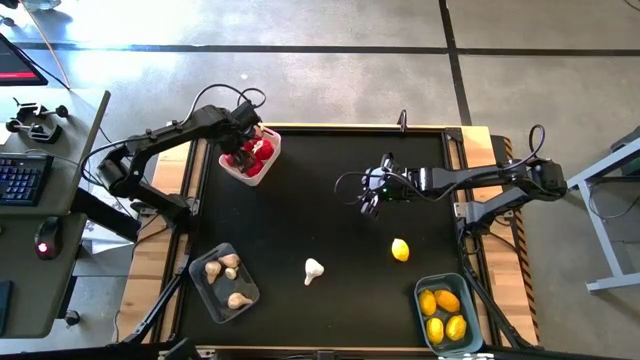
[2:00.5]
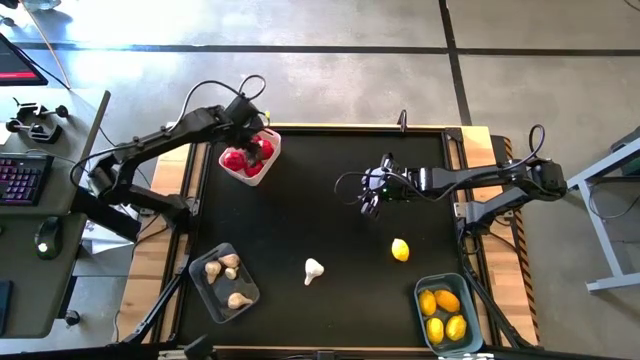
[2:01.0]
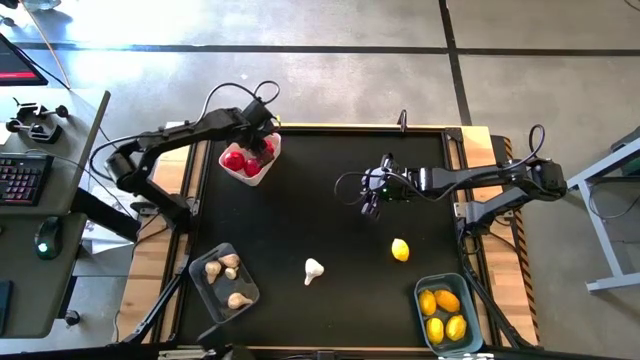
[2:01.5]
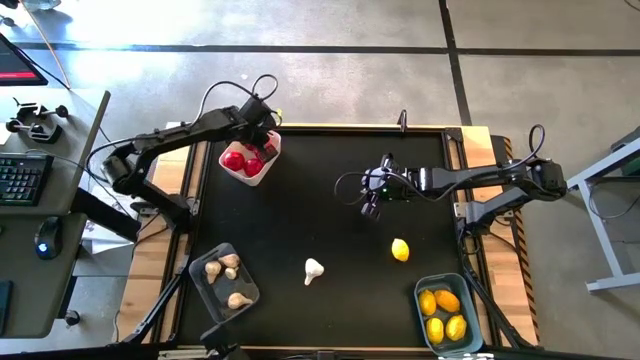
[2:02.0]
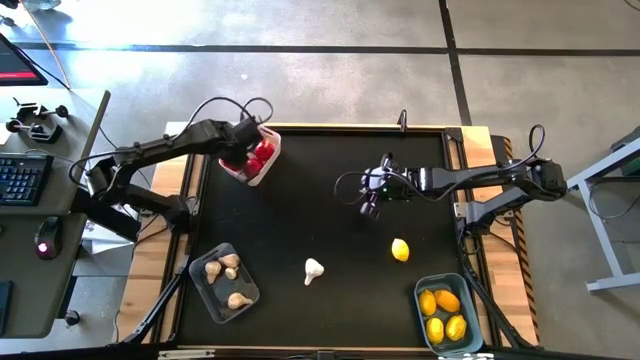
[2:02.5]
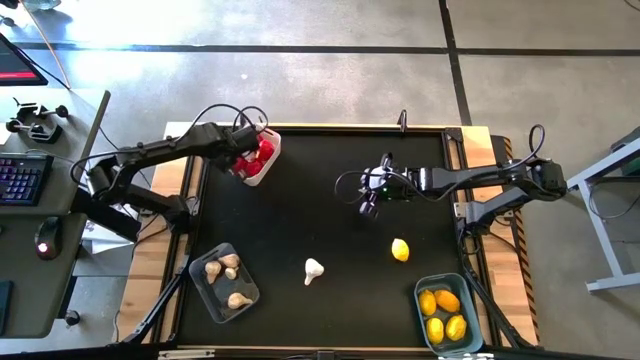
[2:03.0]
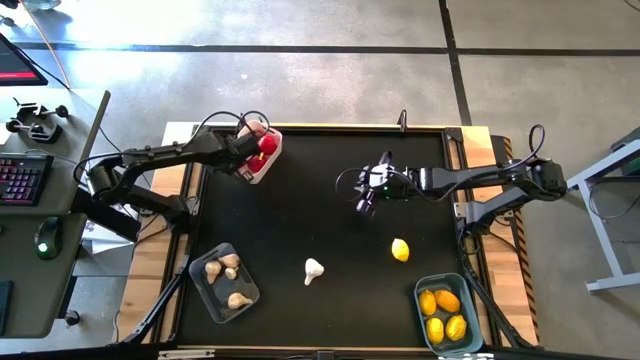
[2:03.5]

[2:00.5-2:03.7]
Task: Sort produce into baskets
Adjust the red tomatoes

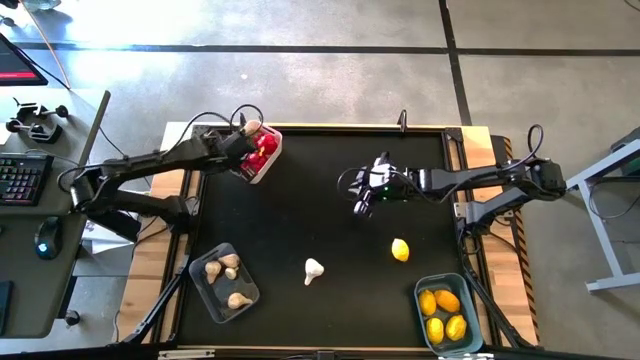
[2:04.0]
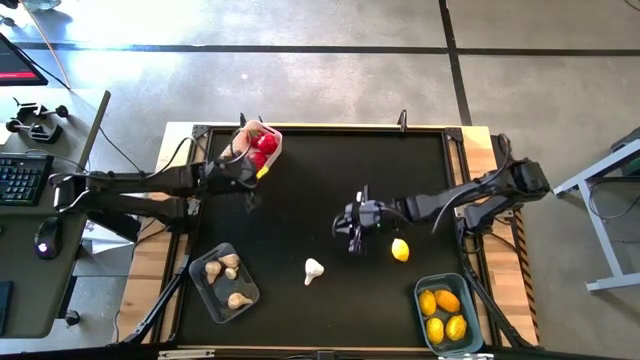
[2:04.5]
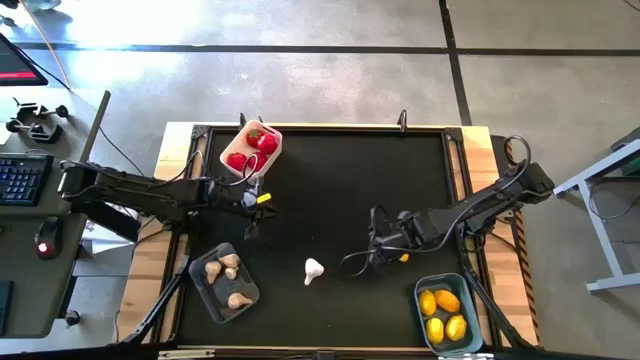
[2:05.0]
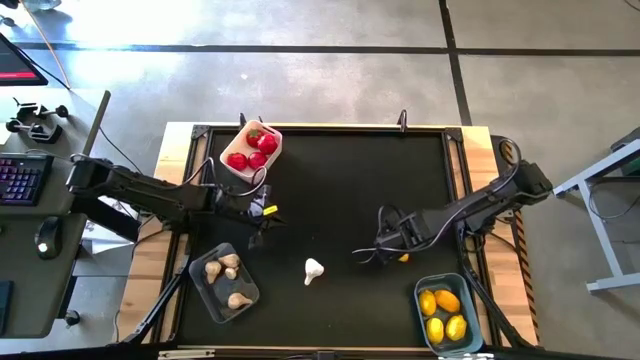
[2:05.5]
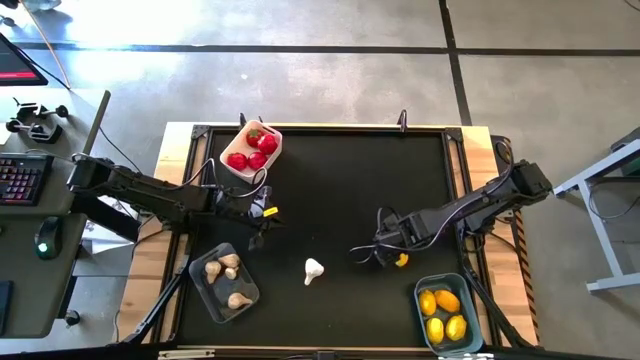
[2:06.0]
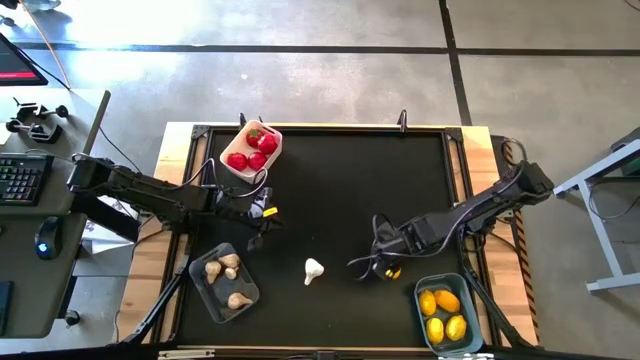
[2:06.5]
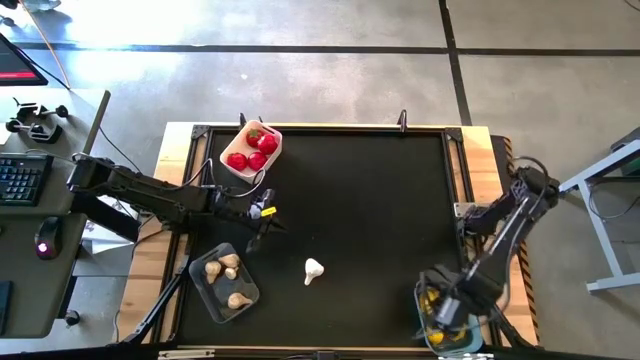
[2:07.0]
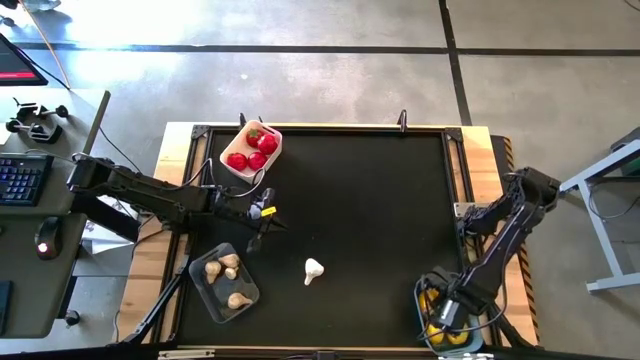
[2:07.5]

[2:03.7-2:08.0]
Put the yellow lemon into the blue bin

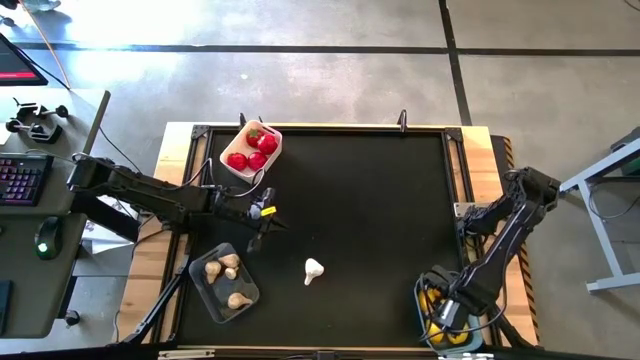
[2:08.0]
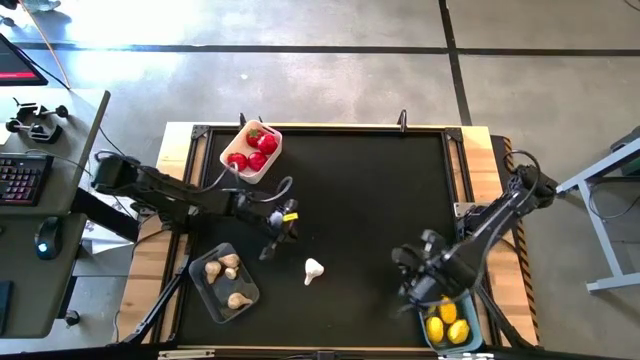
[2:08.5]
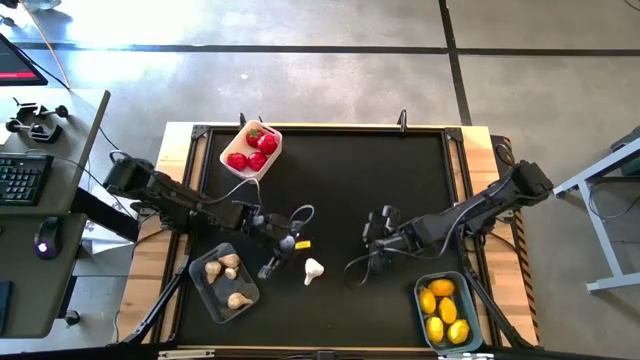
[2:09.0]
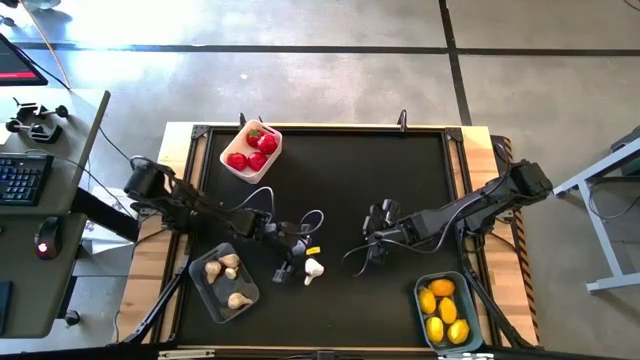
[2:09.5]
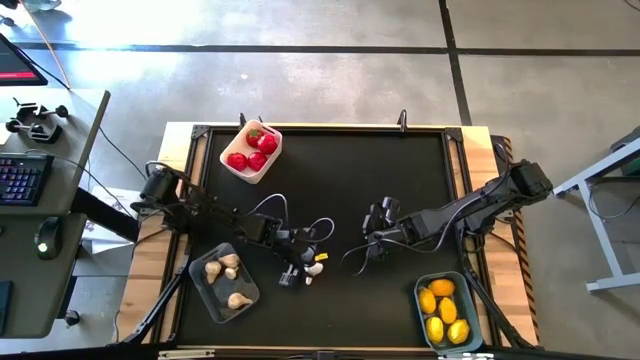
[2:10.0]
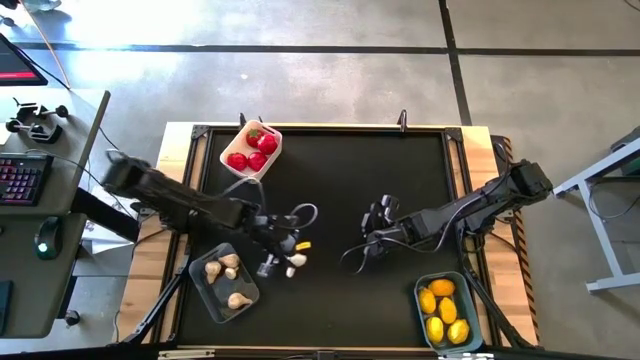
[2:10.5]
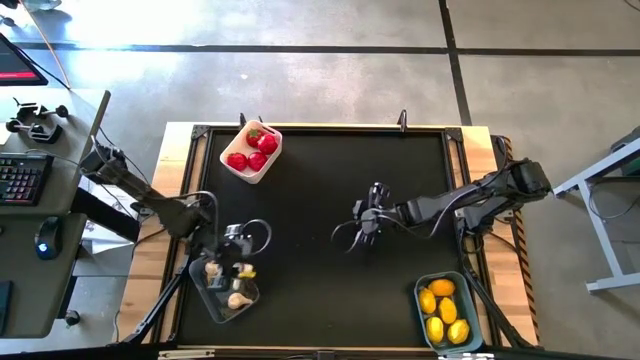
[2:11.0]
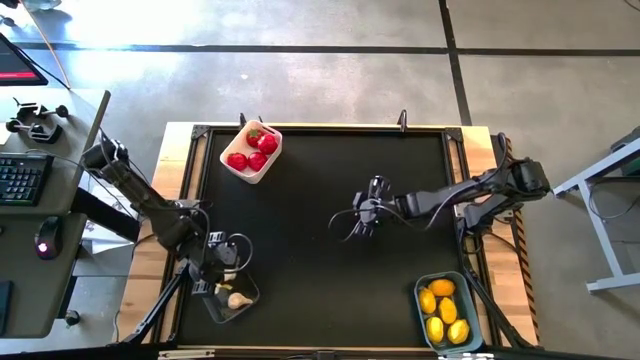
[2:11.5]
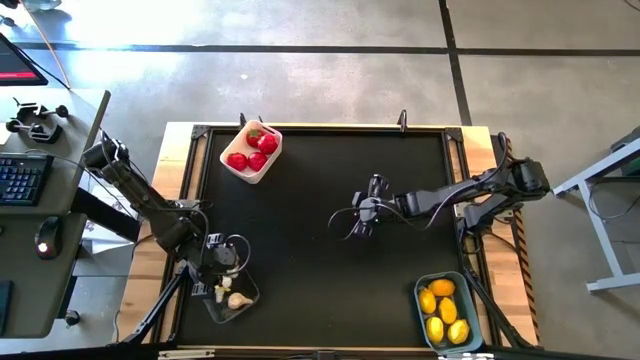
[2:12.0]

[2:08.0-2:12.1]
Put the white garlic into the transparent bin

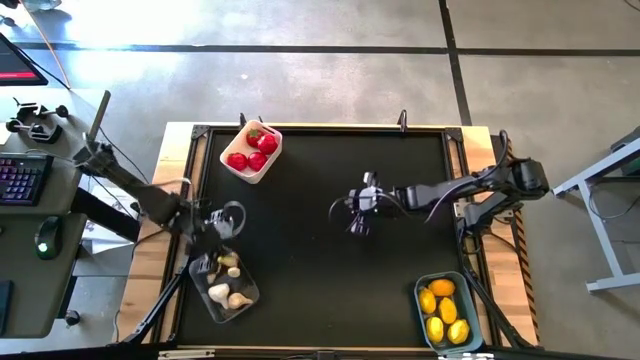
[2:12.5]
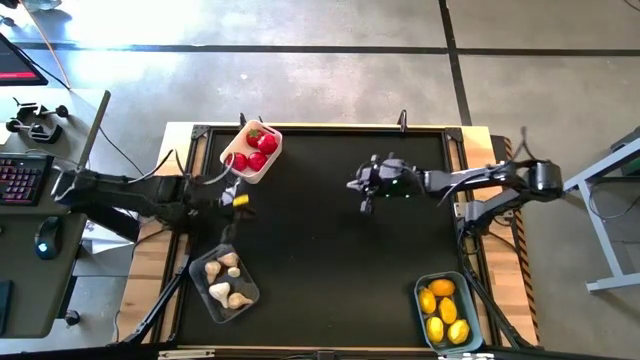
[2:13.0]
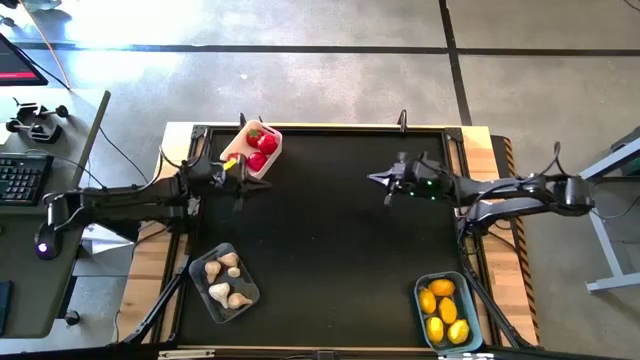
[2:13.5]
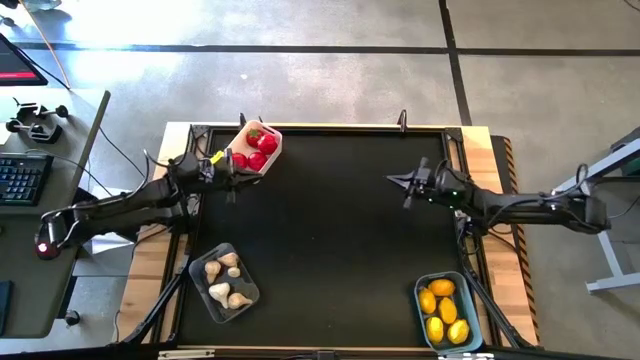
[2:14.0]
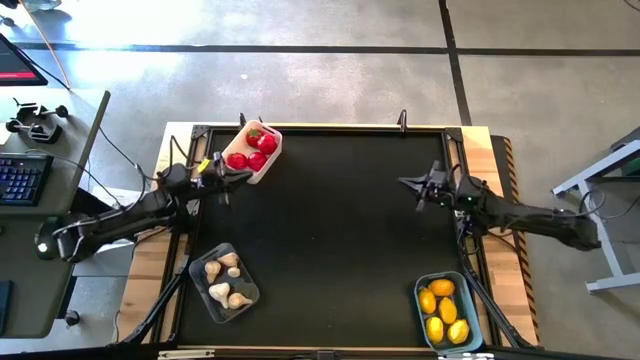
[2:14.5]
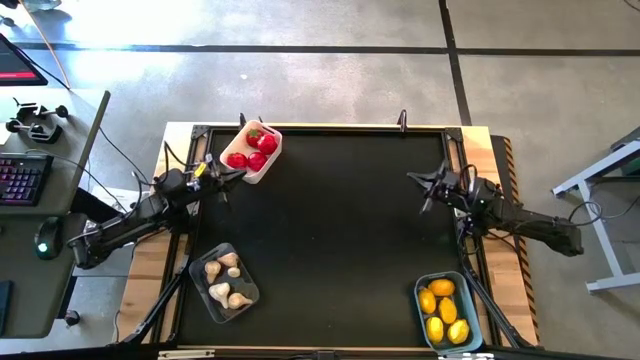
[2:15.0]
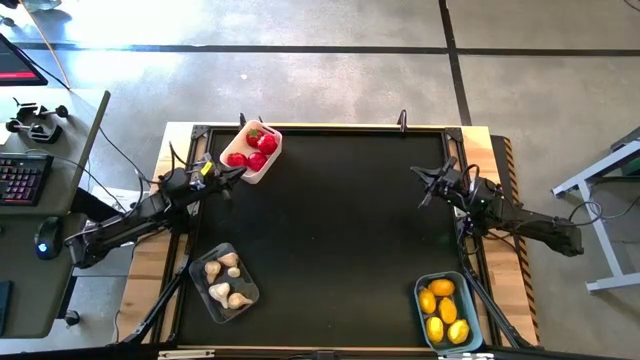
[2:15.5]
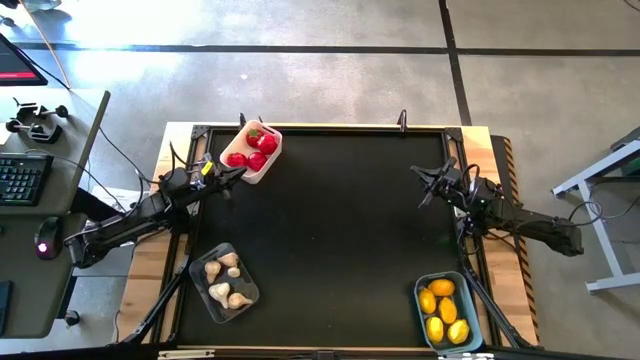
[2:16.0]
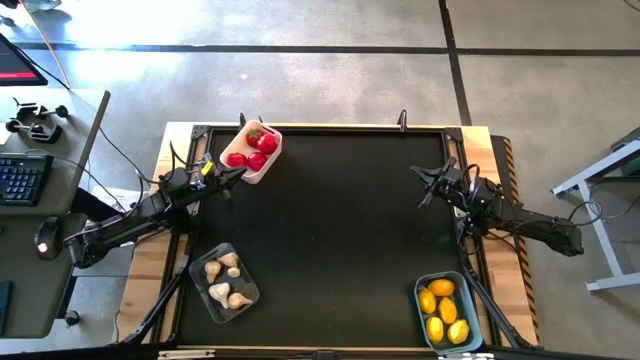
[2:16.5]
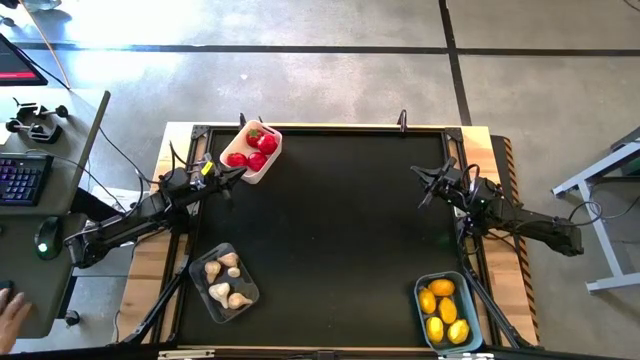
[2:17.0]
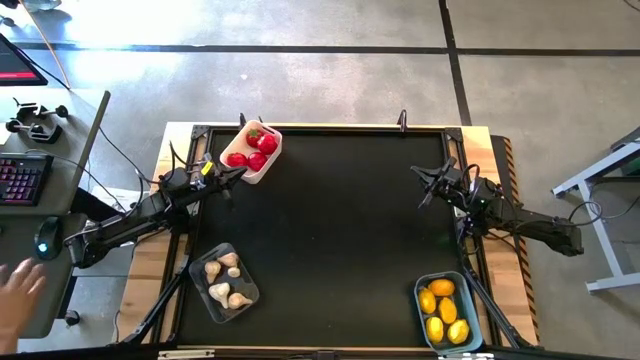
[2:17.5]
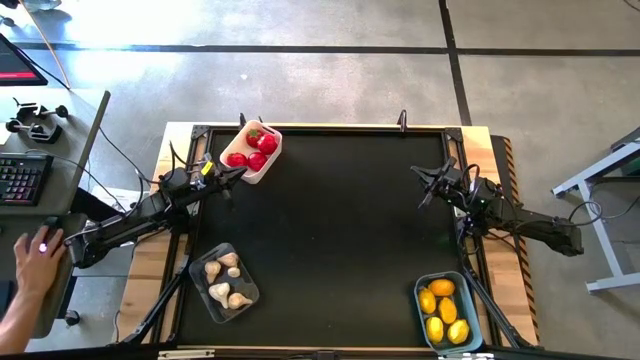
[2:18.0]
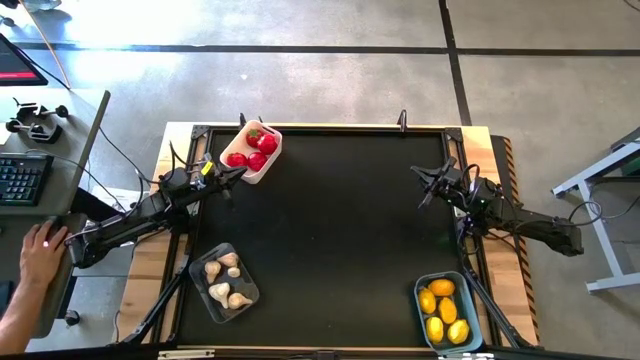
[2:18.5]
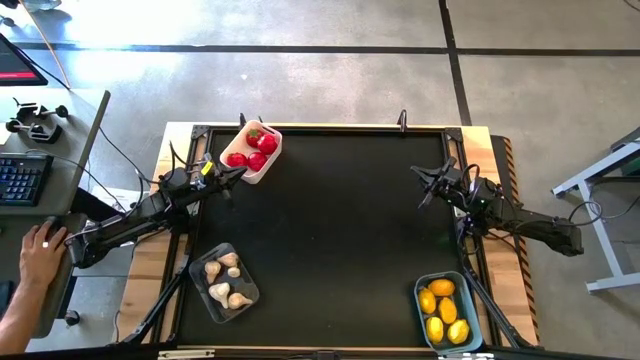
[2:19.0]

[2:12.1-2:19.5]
Return to Home Position

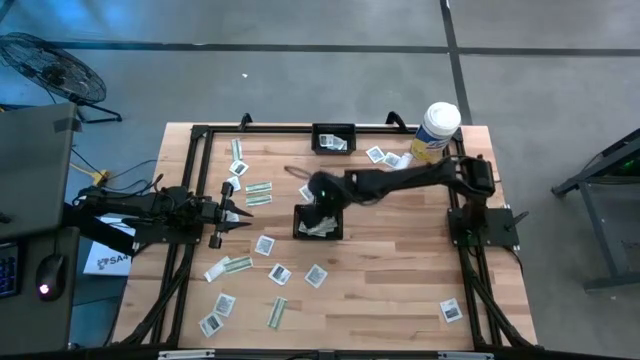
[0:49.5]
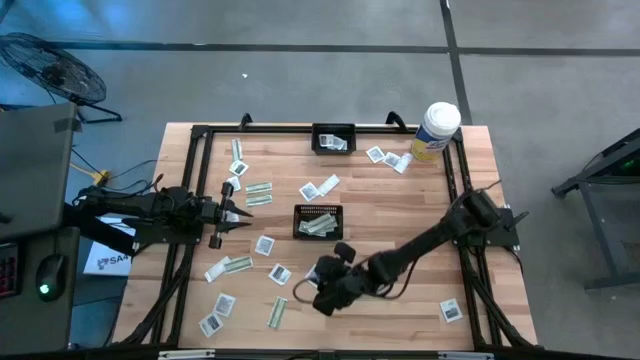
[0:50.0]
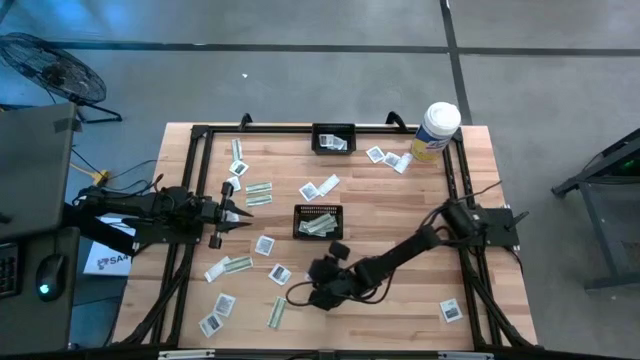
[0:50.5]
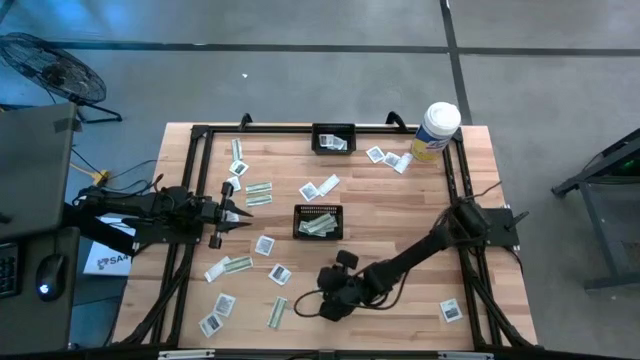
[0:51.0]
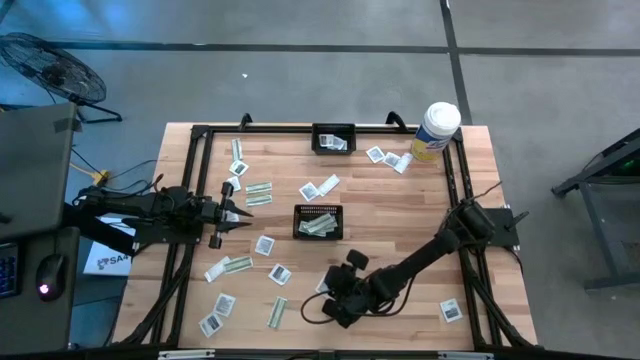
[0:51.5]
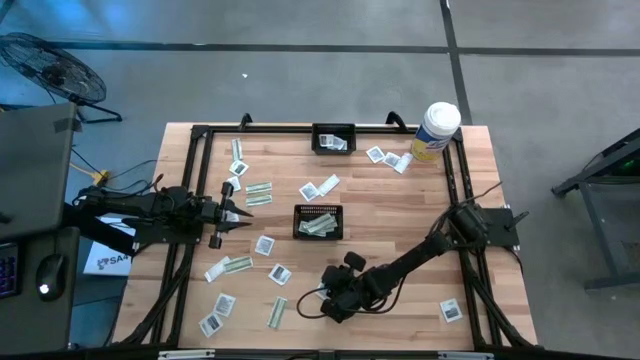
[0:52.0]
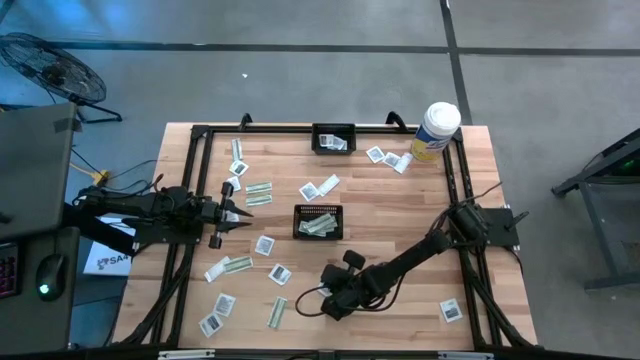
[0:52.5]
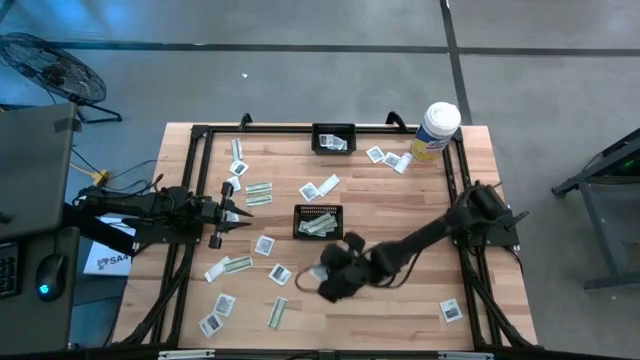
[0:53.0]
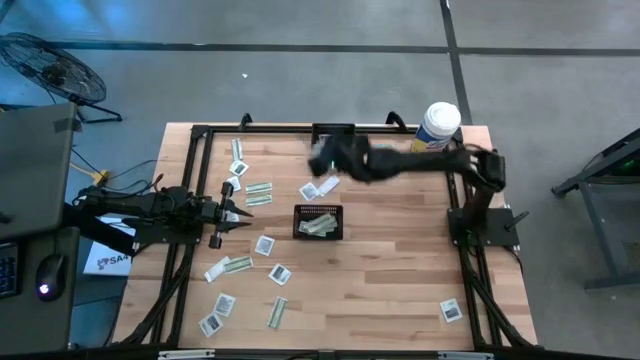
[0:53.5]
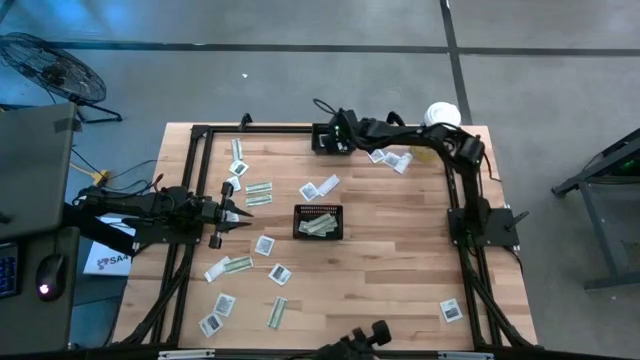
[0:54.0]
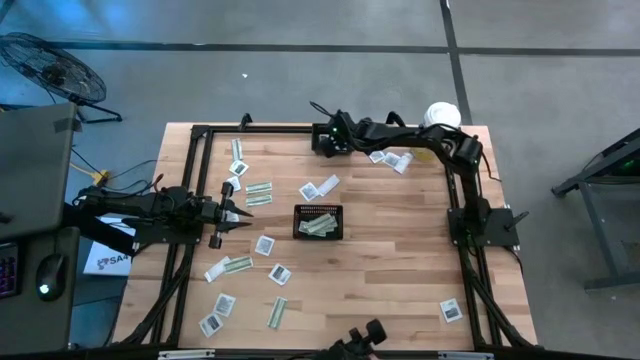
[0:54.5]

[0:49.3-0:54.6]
Task: Pick & Place First Aid Supplies
Put the towelette pack into the top black basket
